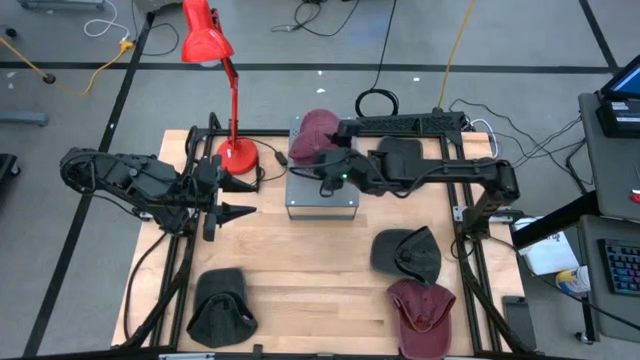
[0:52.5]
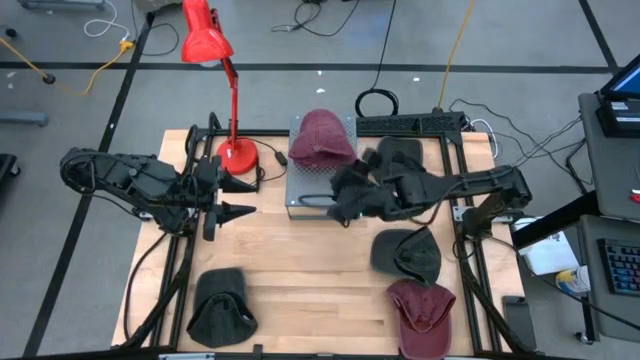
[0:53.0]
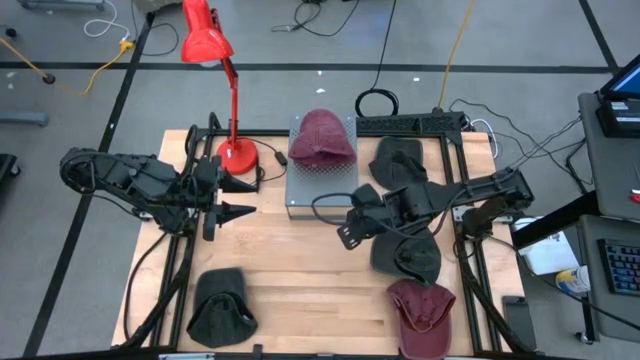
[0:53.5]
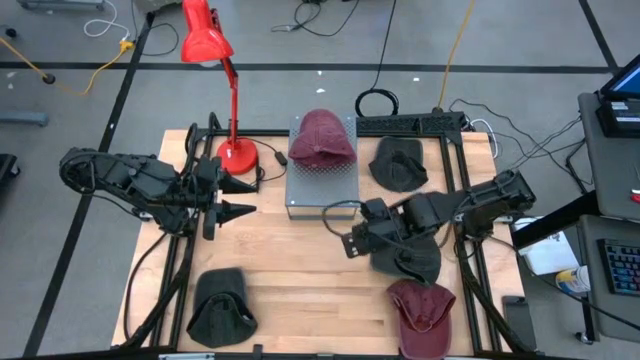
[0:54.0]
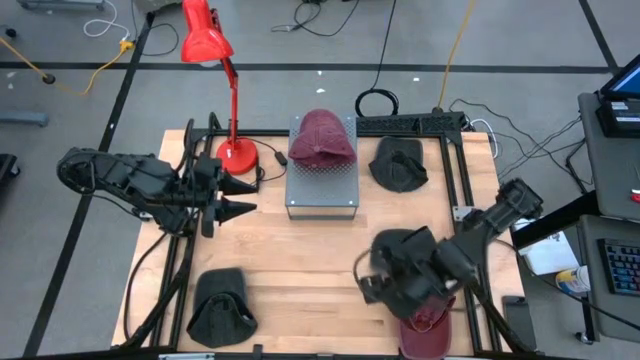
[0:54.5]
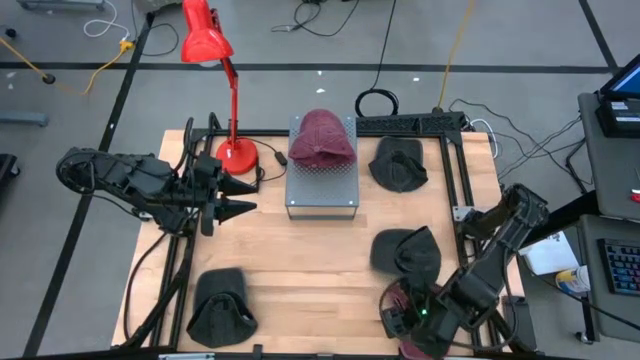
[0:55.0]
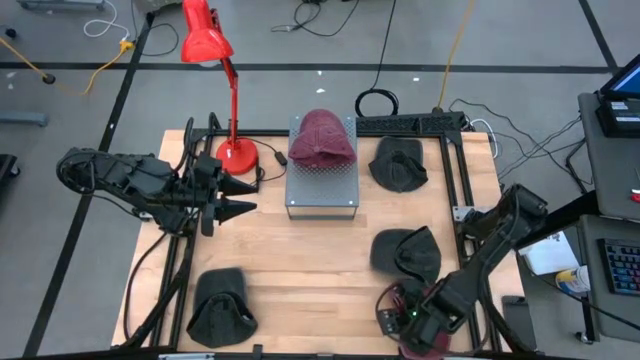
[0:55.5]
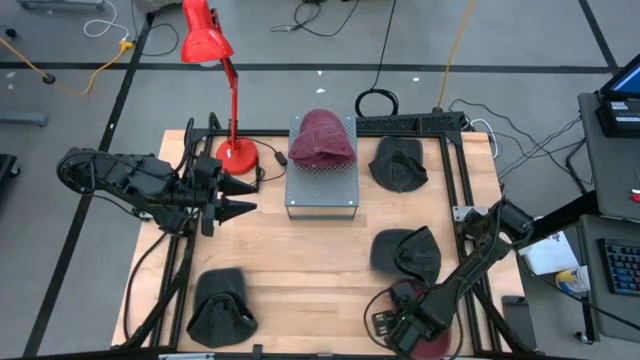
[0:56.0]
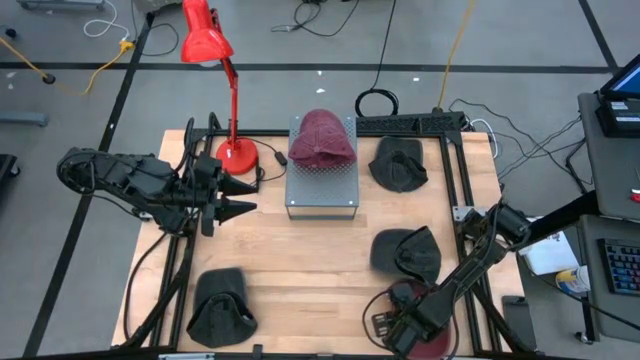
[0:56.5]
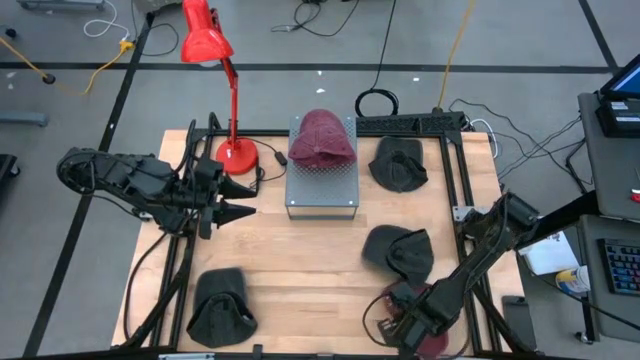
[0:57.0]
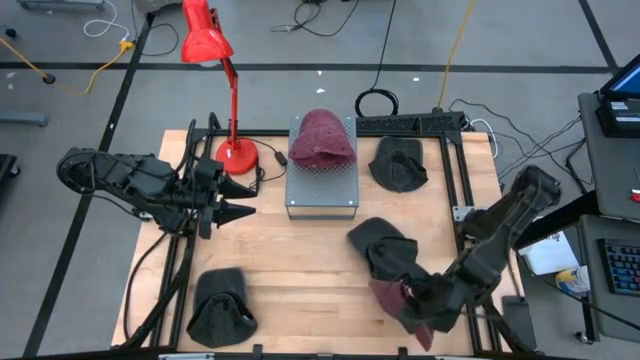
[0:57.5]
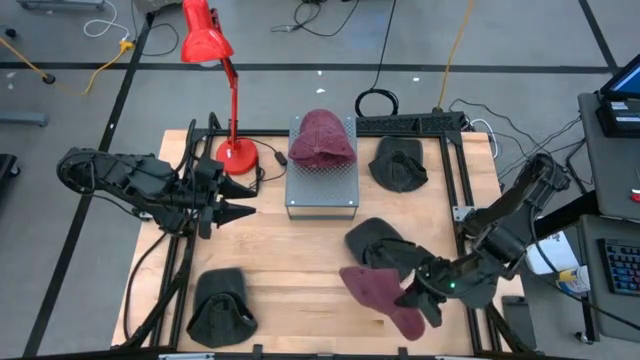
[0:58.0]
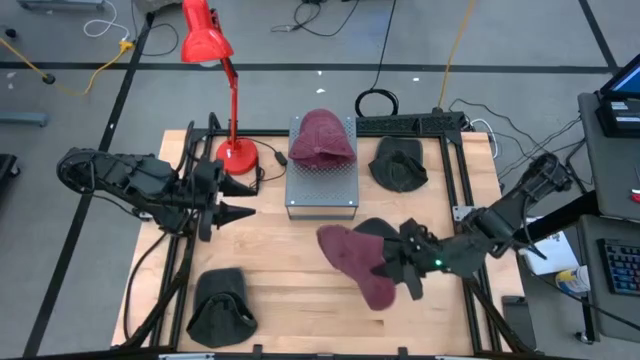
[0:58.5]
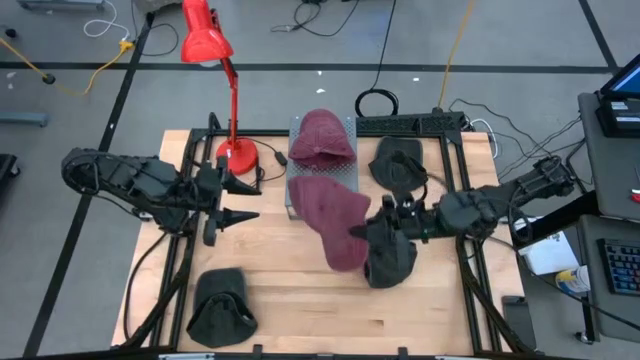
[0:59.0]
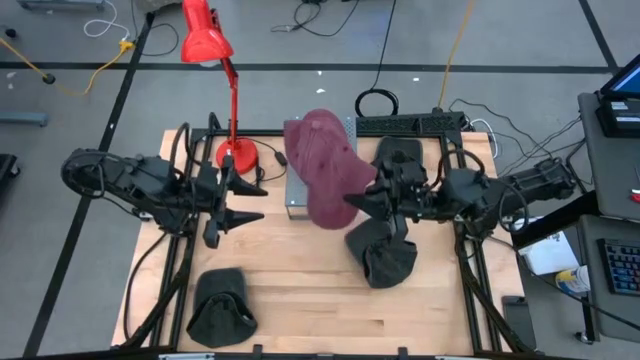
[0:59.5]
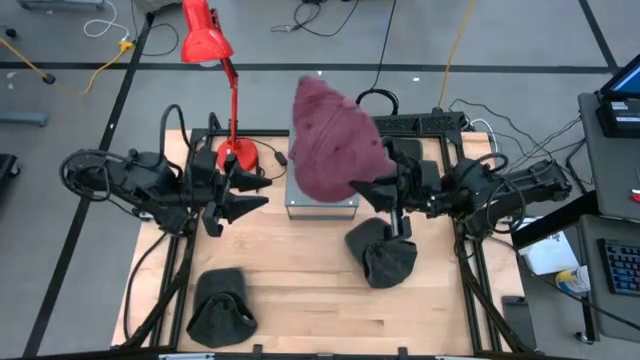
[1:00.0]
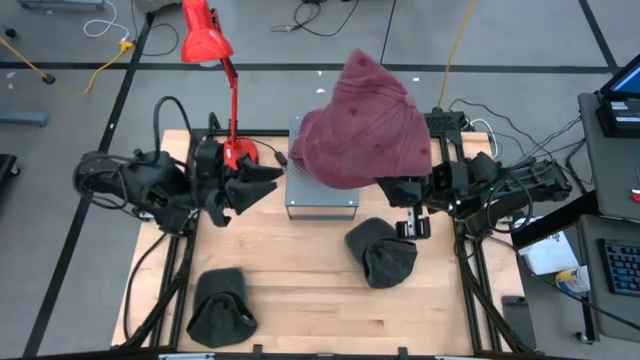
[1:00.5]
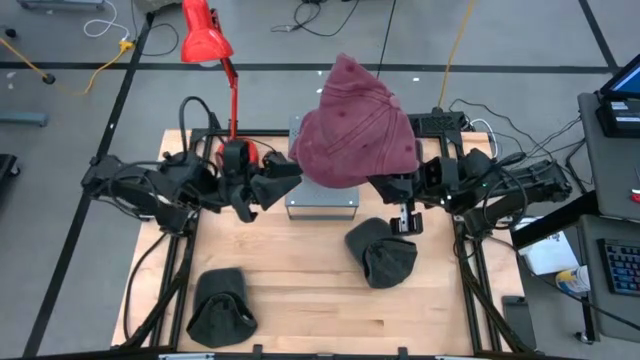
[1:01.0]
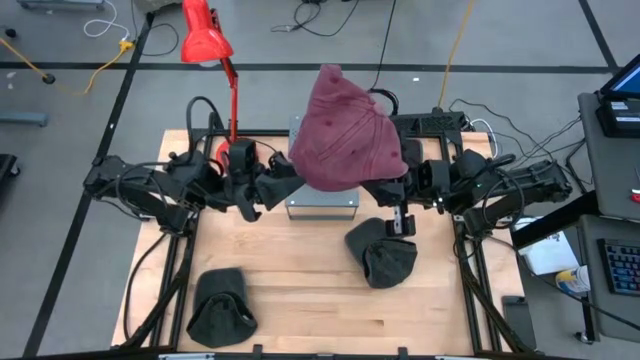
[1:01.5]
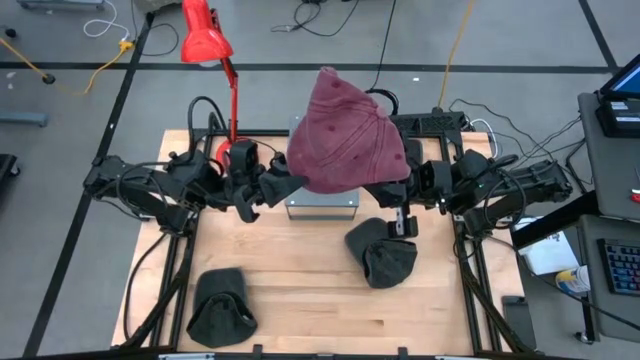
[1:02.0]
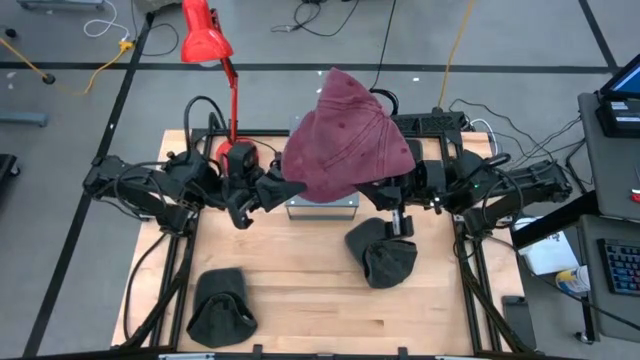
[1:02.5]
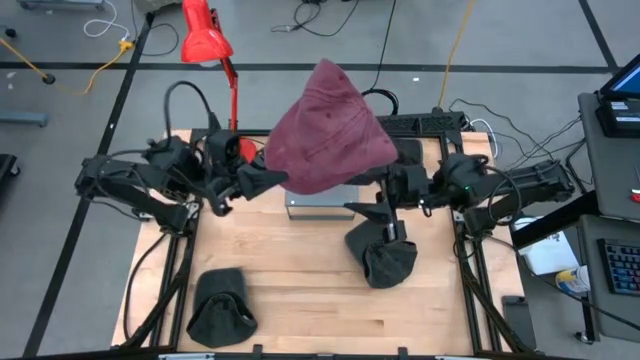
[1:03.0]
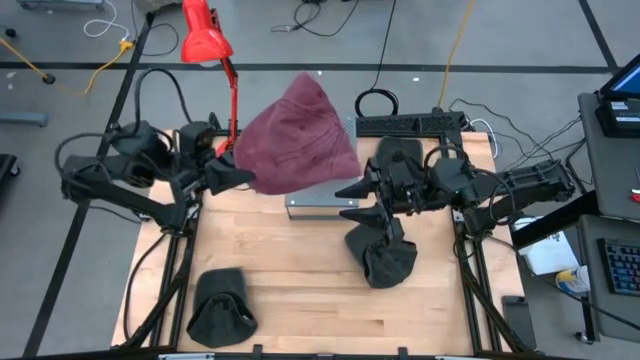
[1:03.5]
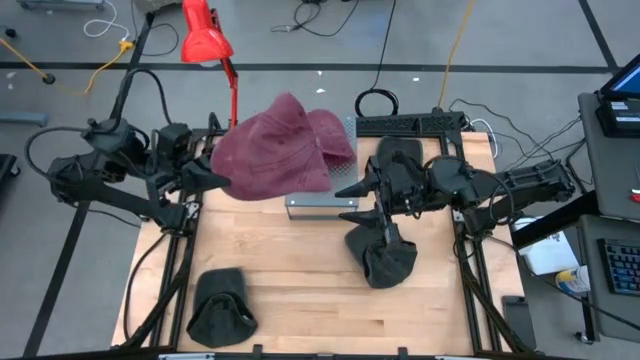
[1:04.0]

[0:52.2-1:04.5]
Task: Pick & Place hat
Stack the red cap on top of the red caps on the shelf

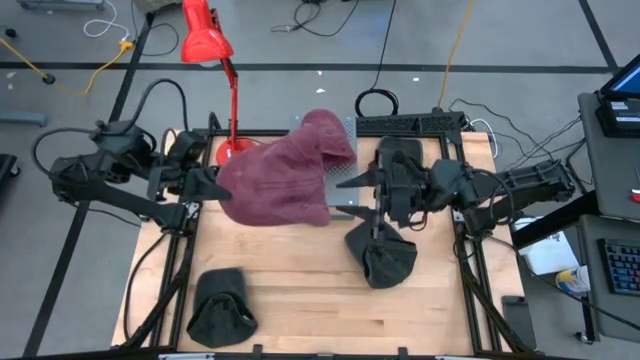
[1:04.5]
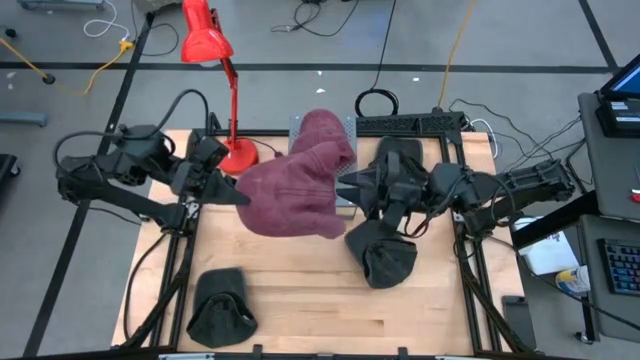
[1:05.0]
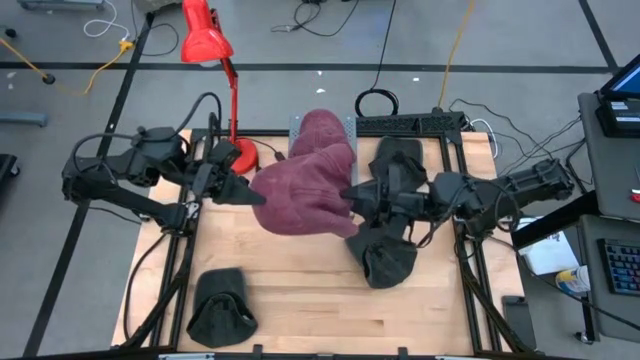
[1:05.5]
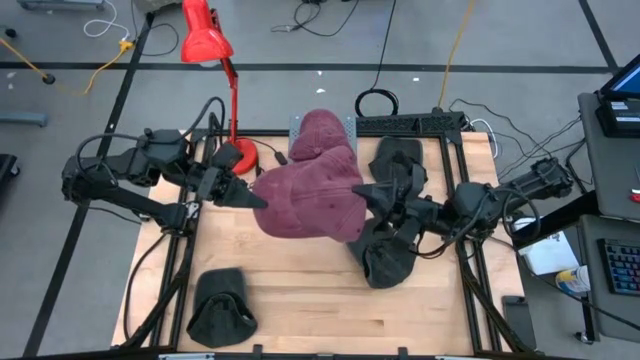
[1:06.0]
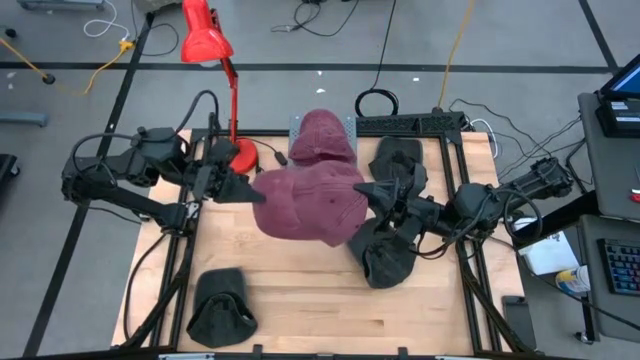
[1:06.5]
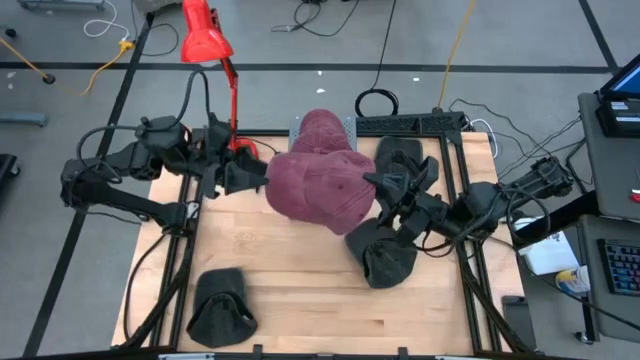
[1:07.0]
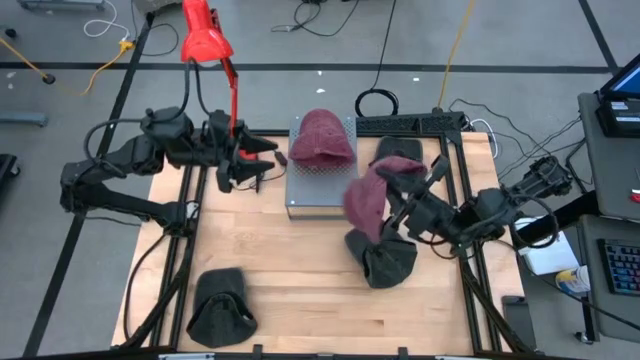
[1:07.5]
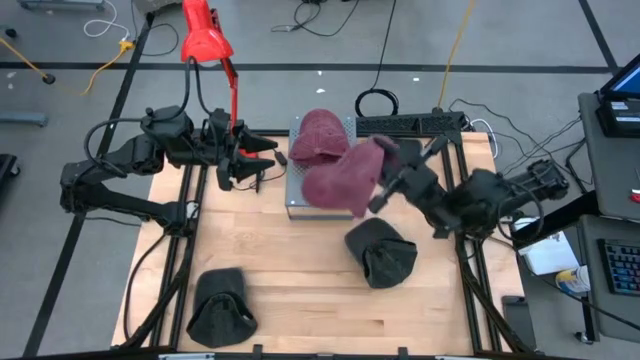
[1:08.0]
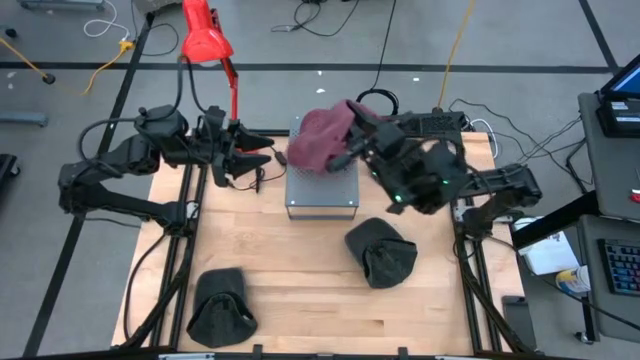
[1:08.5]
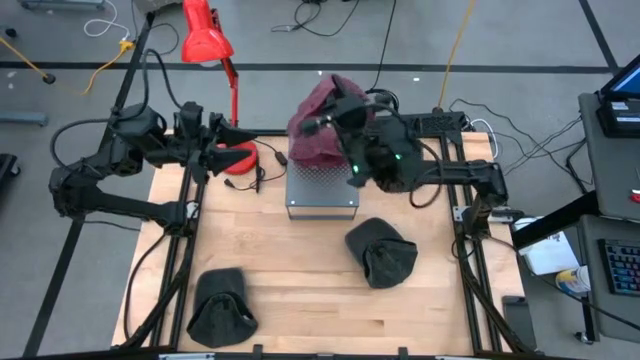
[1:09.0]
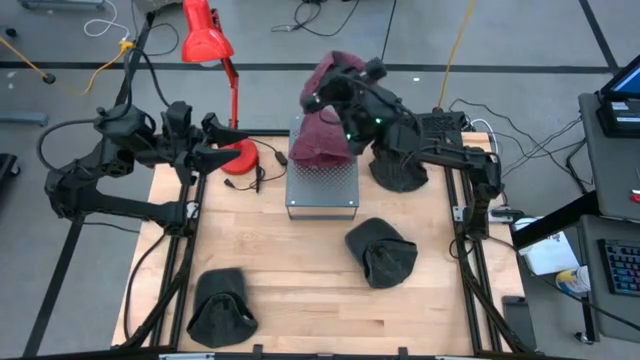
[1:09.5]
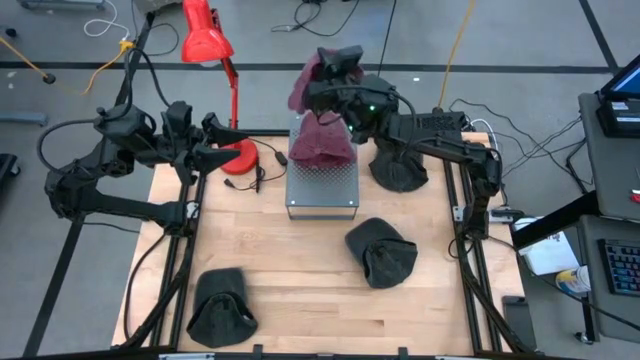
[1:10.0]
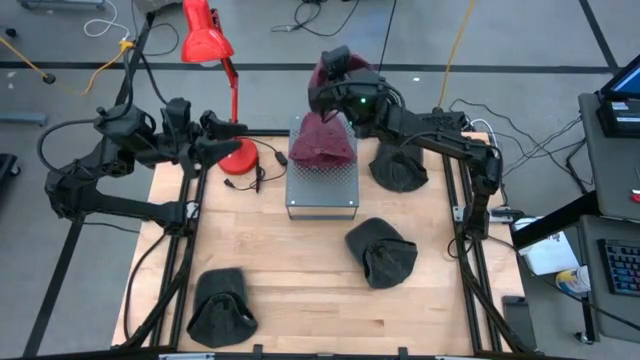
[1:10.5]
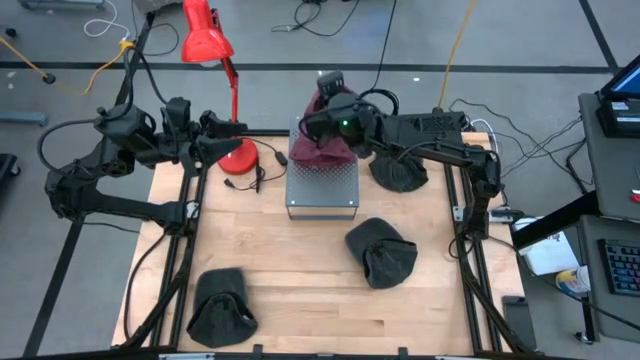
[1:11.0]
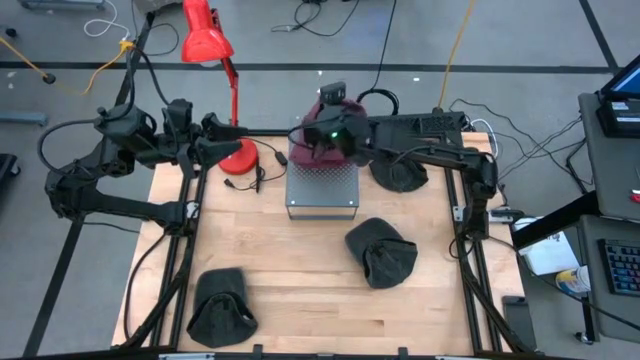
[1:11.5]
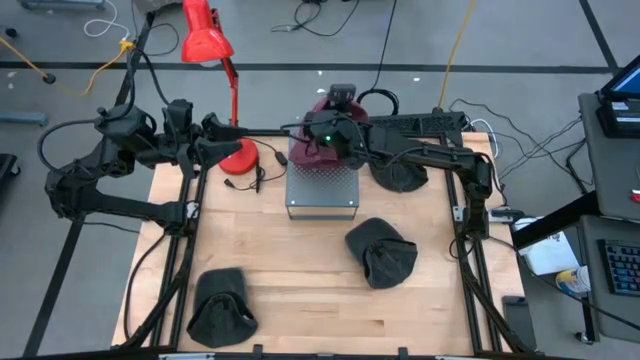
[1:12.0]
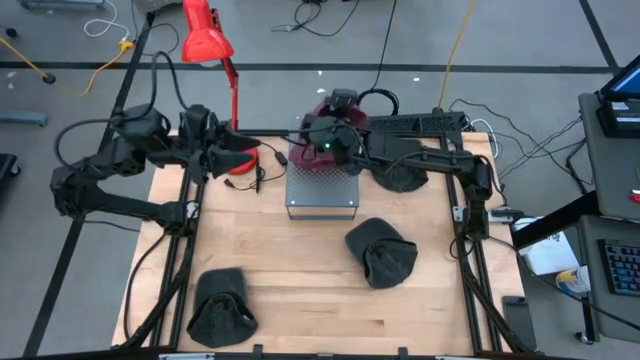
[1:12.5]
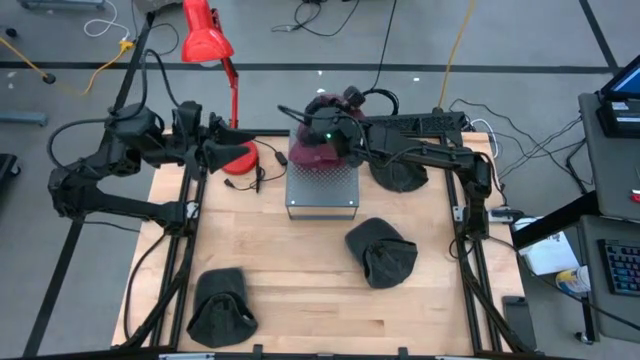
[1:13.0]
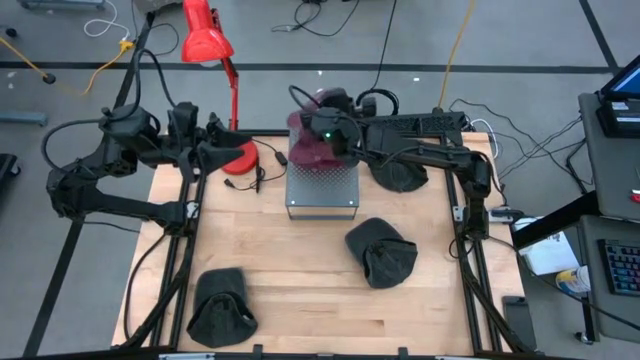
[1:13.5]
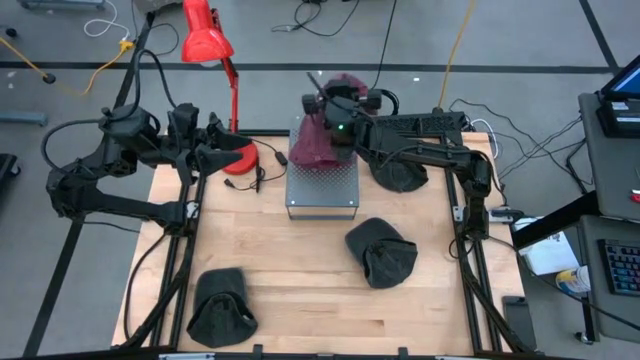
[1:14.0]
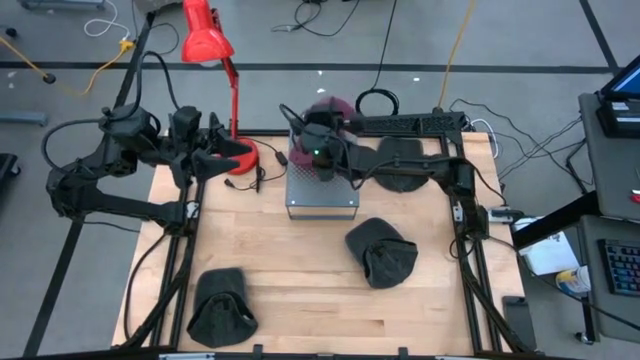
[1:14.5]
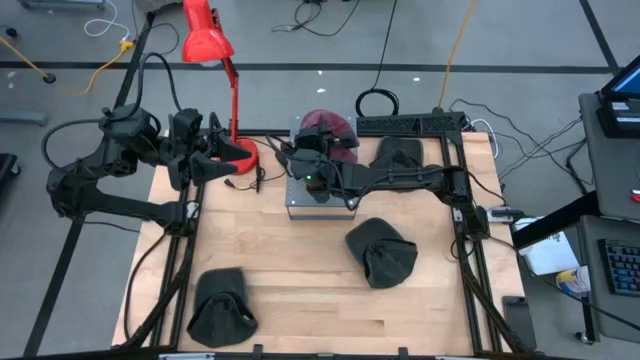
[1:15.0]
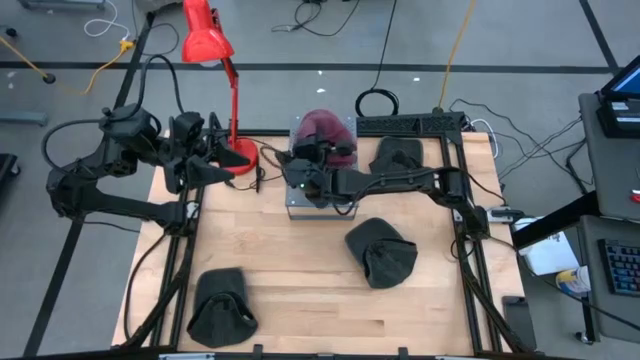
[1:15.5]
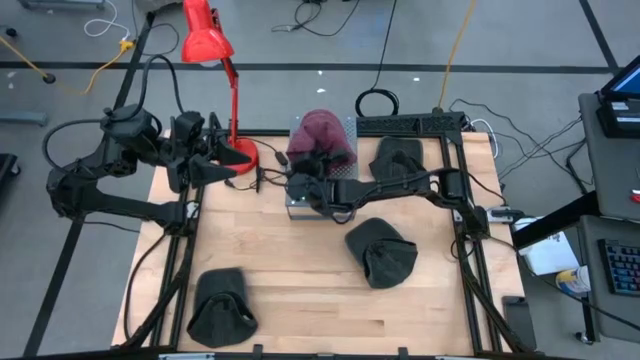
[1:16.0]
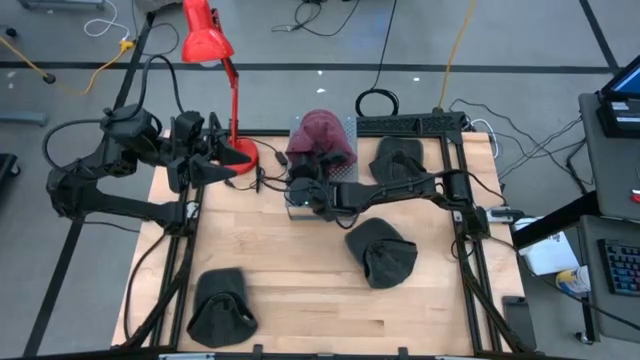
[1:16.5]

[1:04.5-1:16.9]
Stack the red cap on top of the red caps on the shelf
